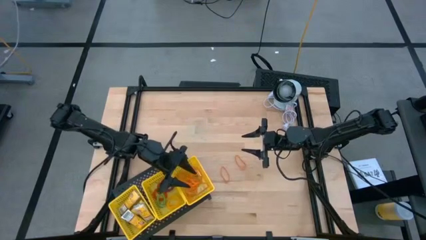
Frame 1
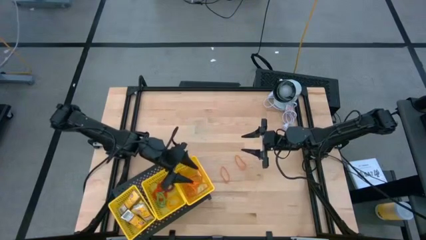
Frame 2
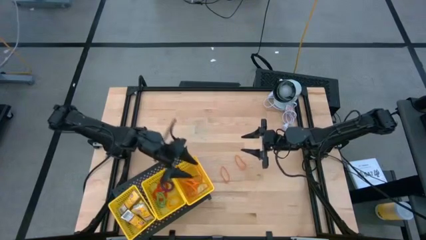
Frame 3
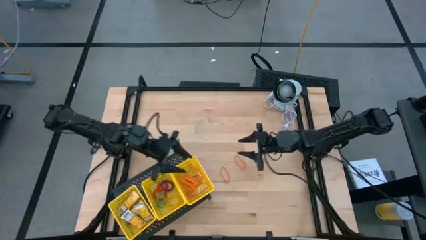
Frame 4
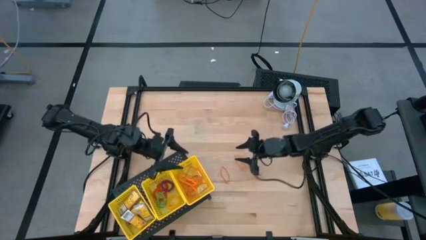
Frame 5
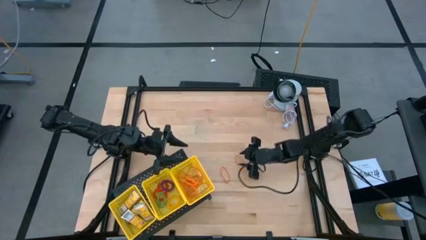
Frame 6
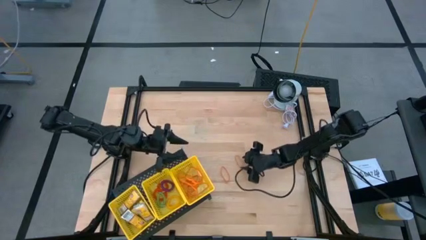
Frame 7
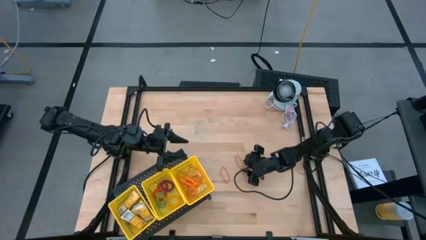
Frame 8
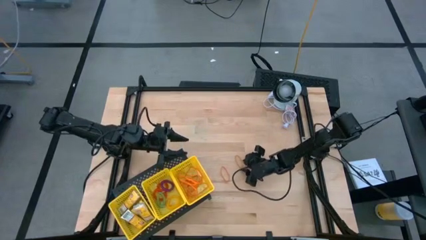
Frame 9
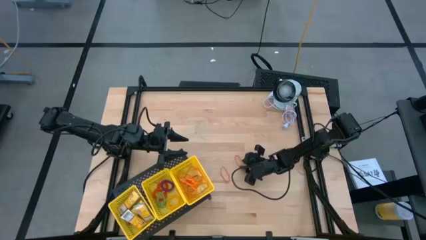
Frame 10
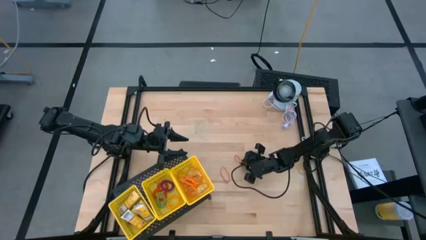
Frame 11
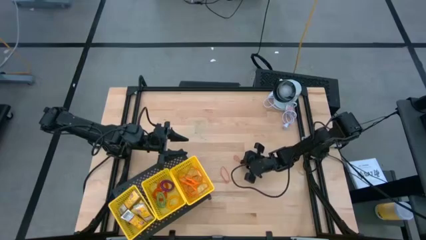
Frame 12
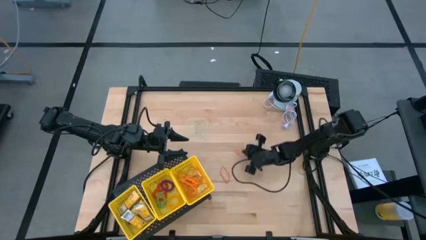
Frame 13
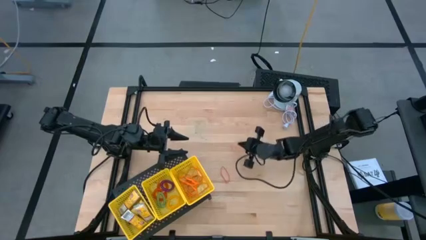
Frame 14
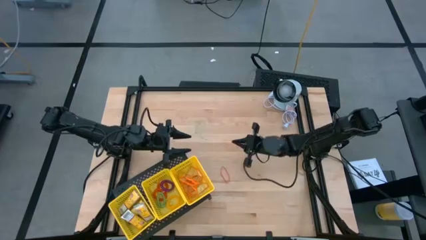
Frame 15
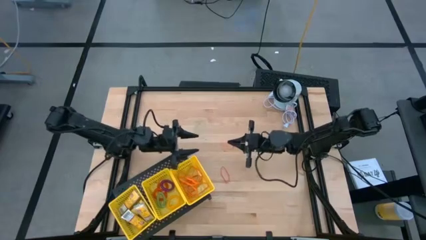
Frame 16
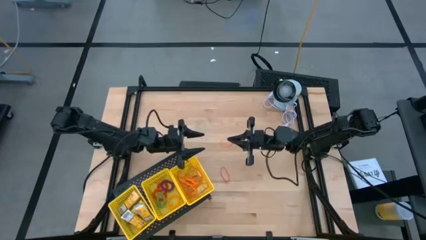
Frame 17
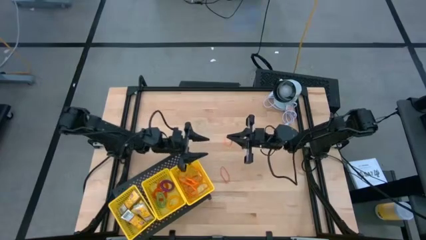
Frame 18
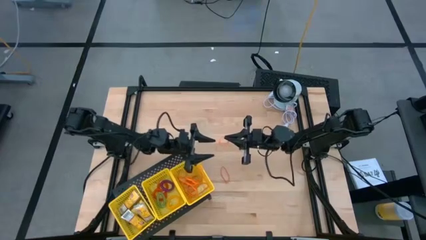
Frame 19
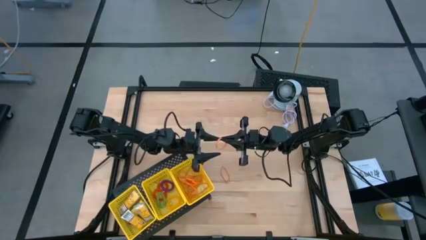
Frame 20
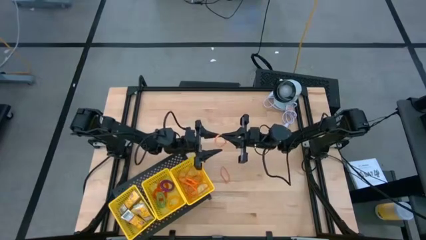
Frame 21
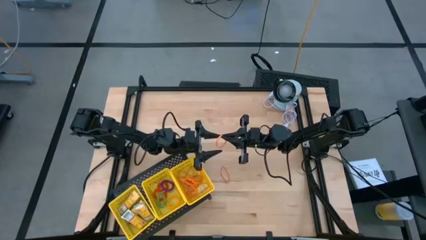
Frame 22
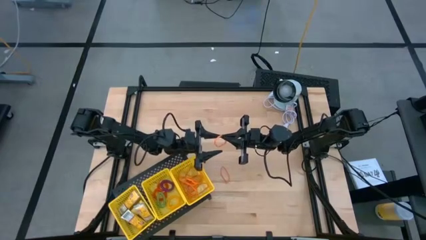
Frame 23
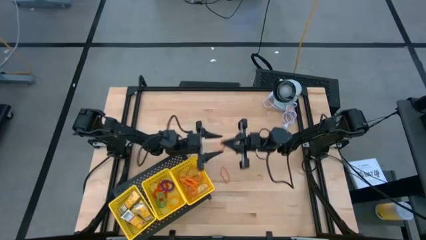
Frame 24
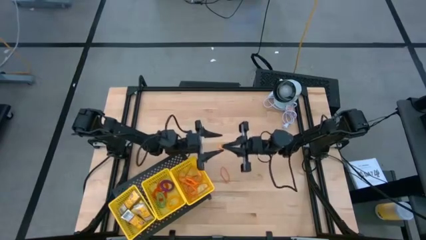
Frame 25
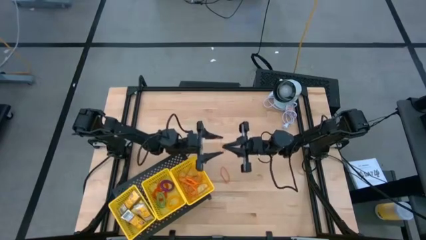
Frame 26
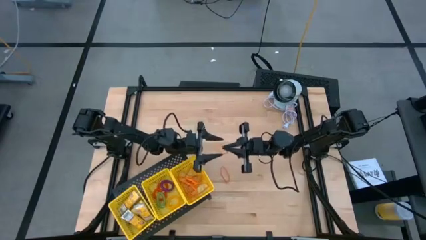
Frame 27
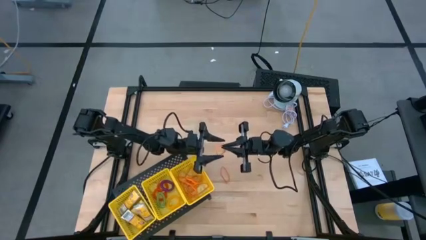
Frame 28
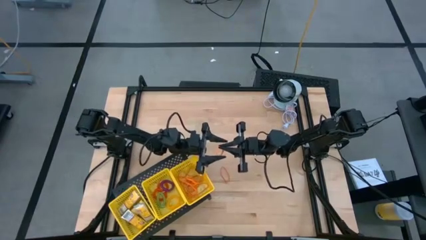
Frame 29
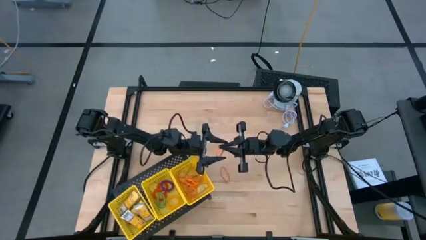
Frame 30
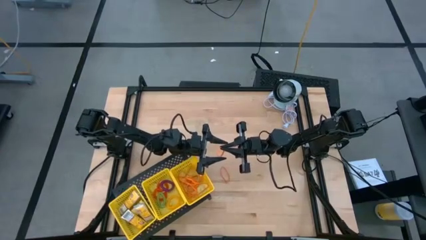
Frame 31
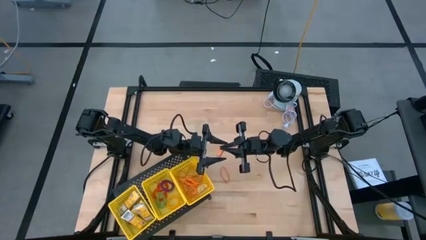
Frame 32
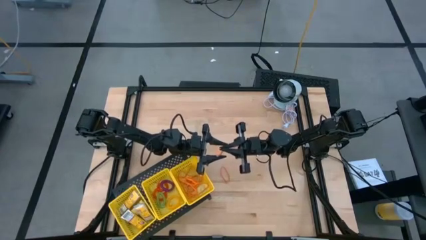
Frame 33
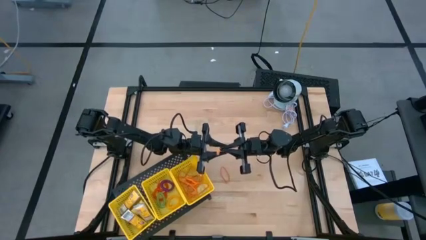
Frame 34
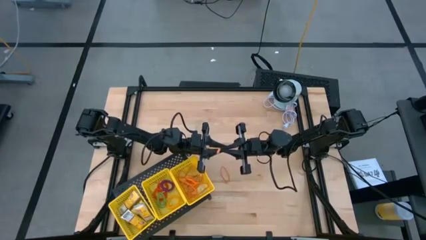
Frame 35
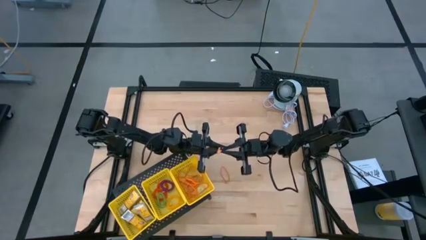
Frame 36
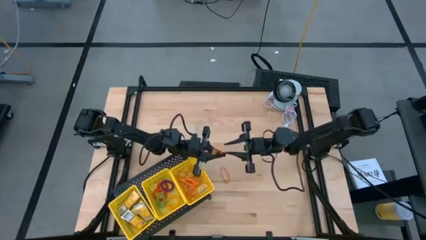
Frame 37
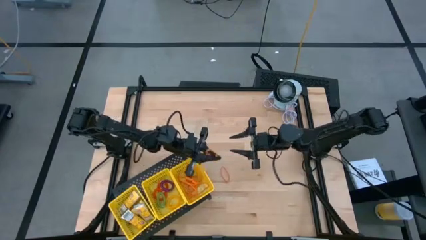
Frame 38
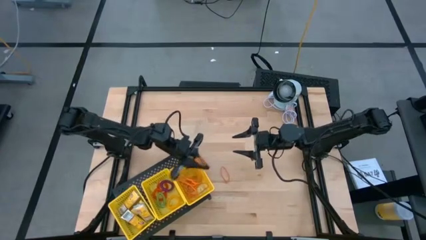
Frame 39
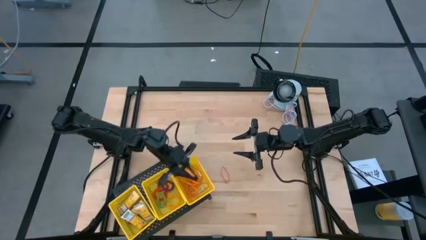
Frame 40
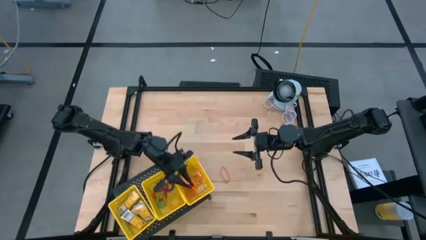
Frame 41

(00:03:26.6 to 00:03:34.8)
Task: Pick & Place Office Desk Supplies
Put the orange rubber band into the right yellow bin on the shelf

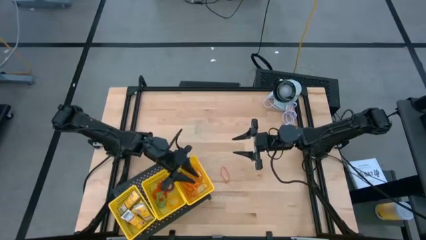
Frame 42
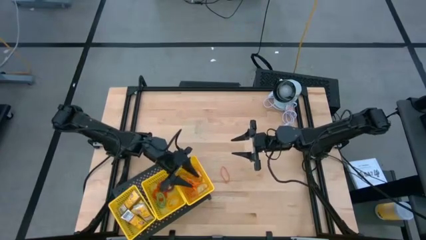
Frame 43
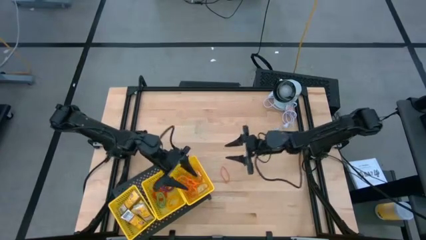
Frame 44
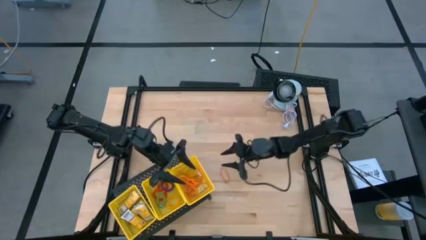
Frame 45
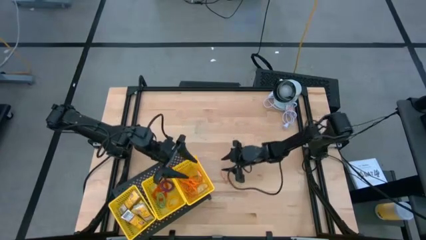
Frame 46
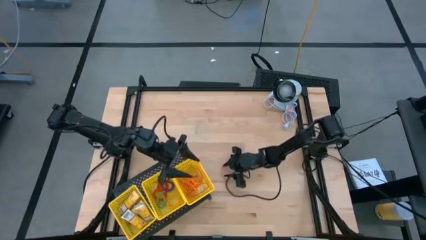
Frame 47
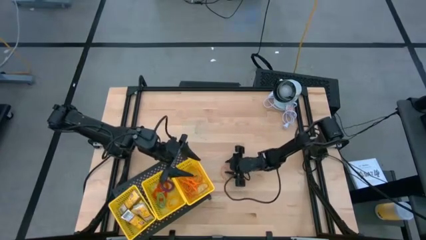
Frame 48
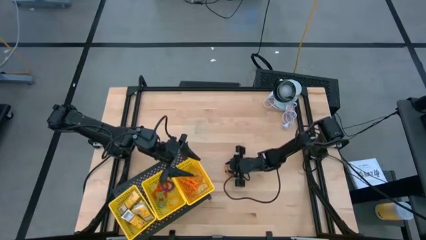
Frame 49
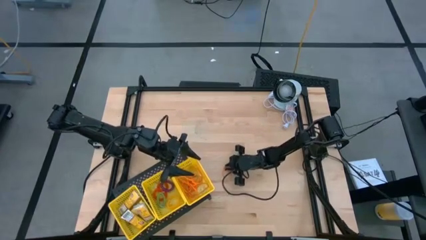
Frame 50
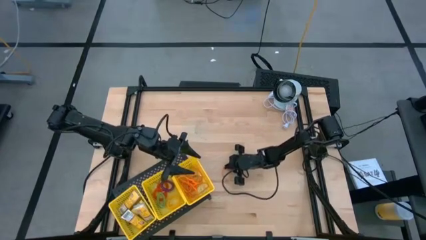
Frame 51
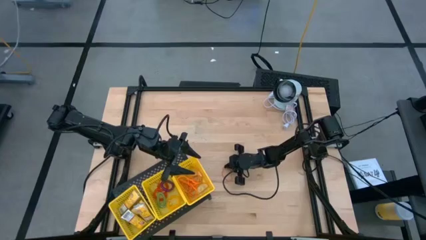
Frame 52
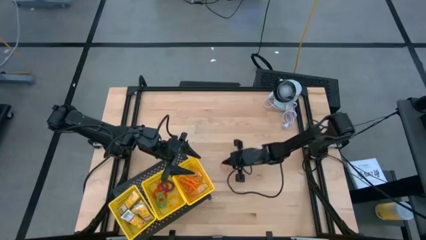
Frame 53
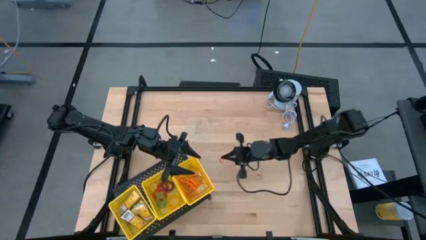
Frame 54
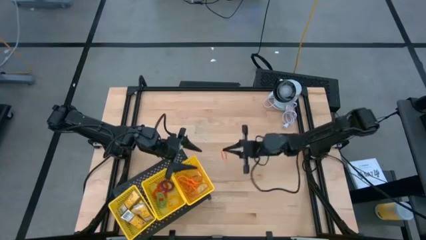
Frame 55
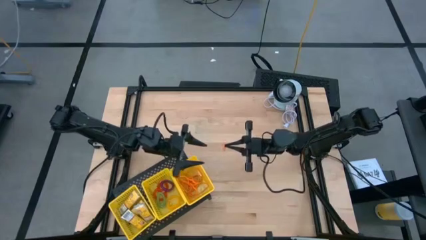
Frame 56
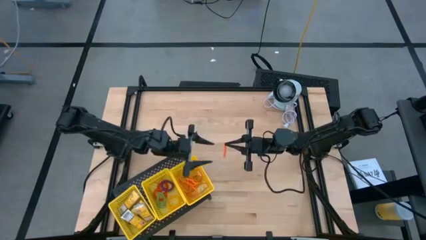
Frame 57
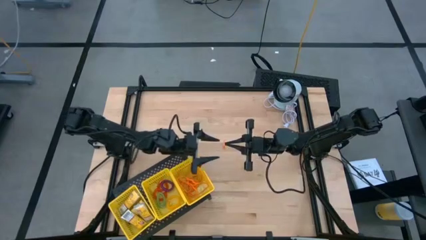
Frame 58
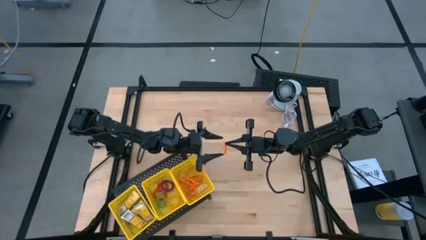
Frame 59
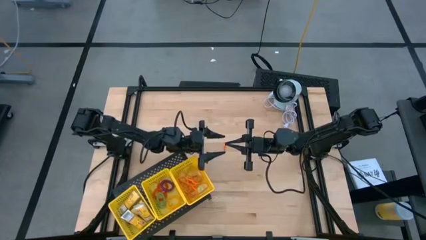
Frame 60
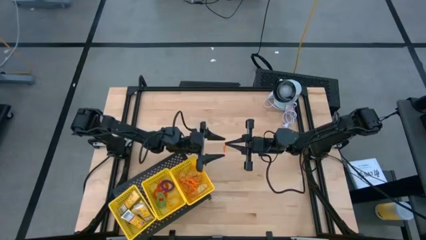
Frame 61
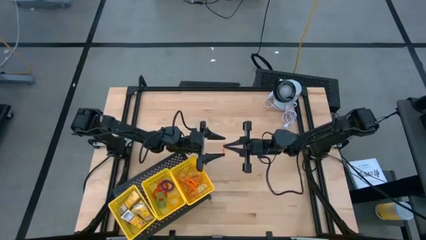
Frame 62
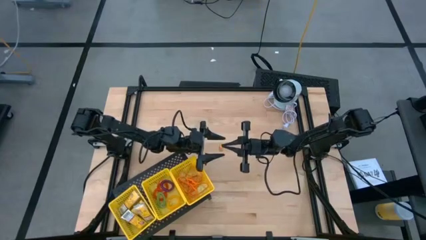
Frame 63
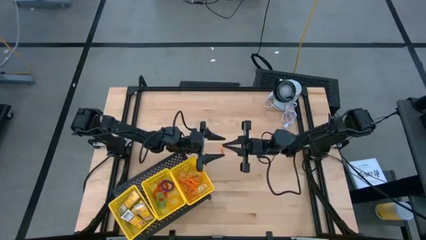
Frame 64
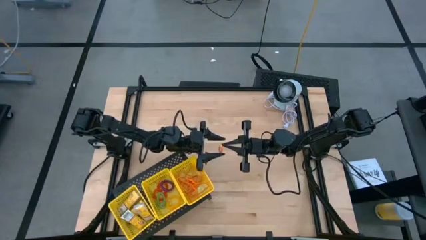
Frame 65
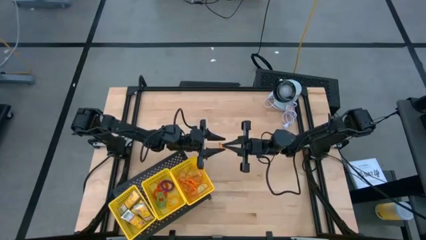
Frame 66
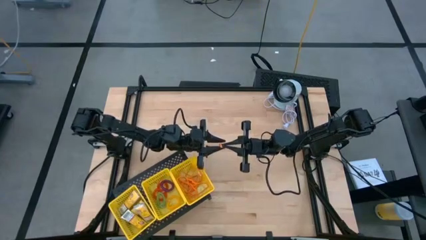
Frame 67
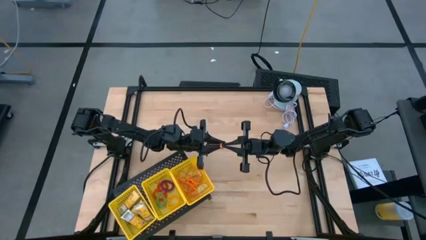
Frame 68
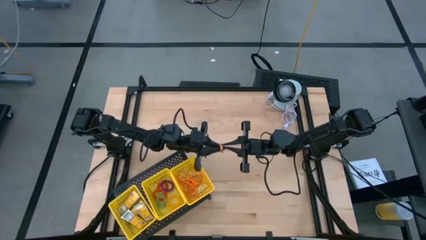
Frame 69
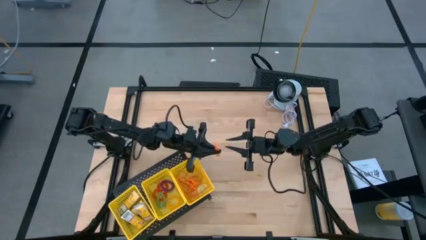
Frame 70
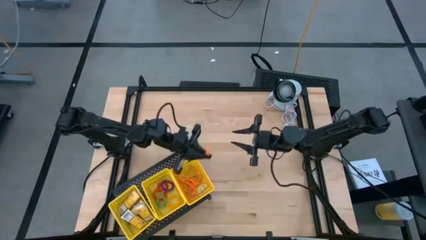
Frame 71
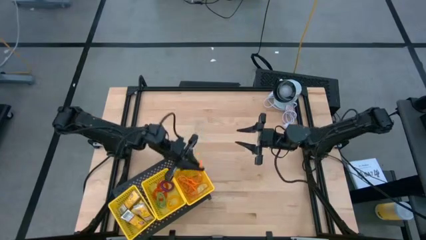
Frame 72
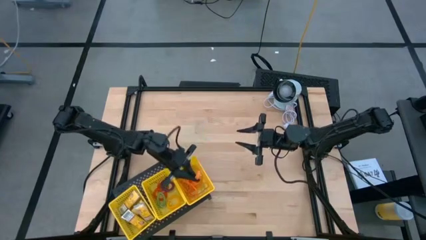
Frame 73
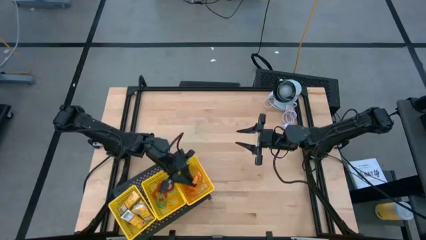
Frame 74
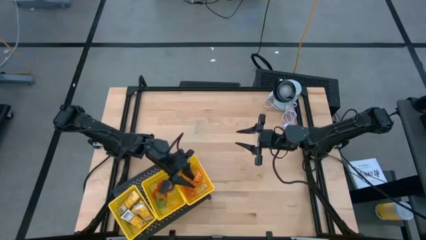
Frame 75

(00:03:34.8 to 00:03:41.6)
Put the orange rubber band into the right yellow bin on the shelf
